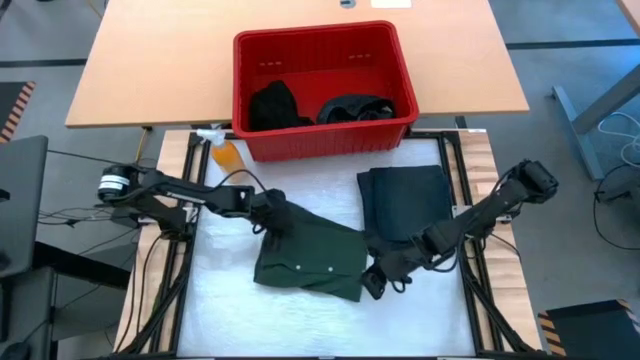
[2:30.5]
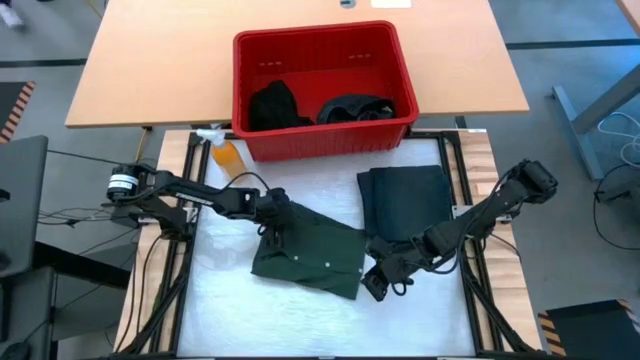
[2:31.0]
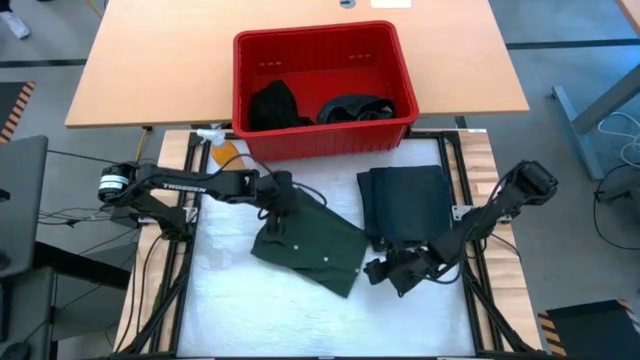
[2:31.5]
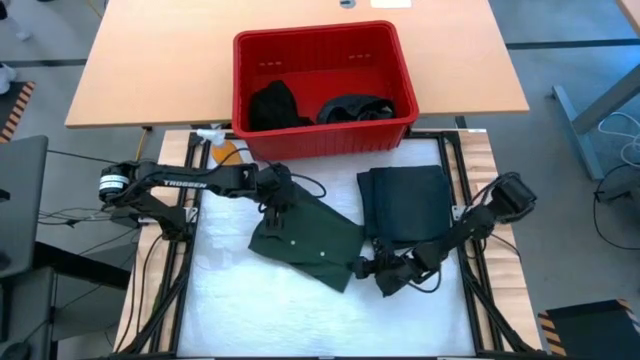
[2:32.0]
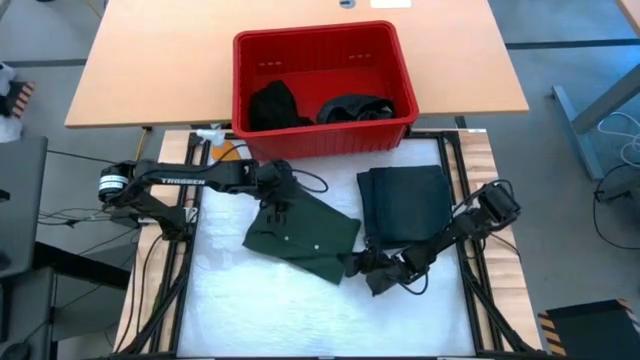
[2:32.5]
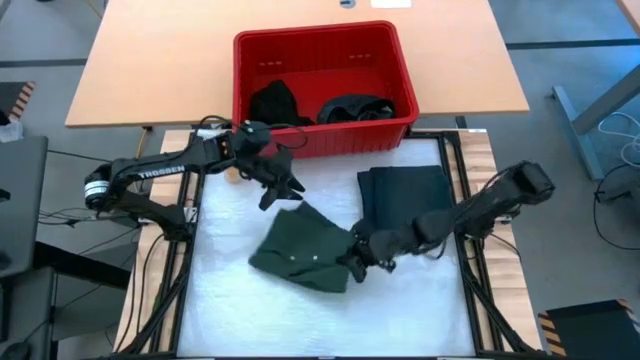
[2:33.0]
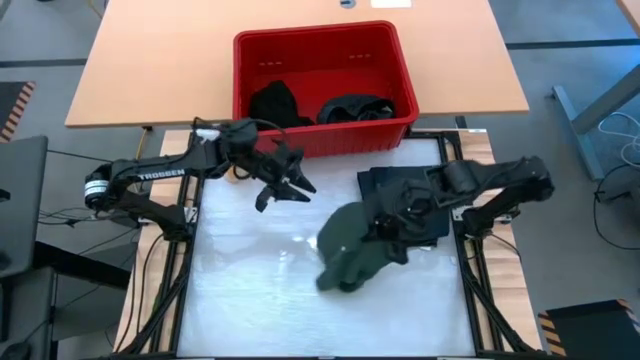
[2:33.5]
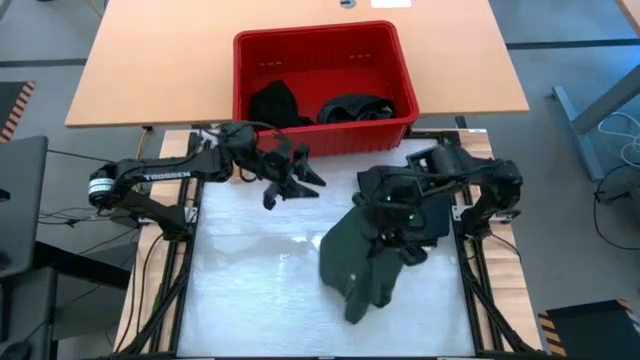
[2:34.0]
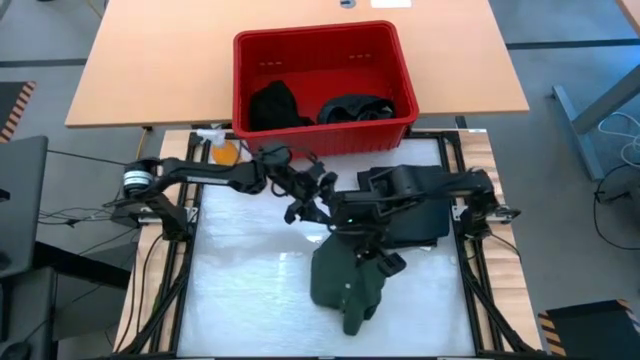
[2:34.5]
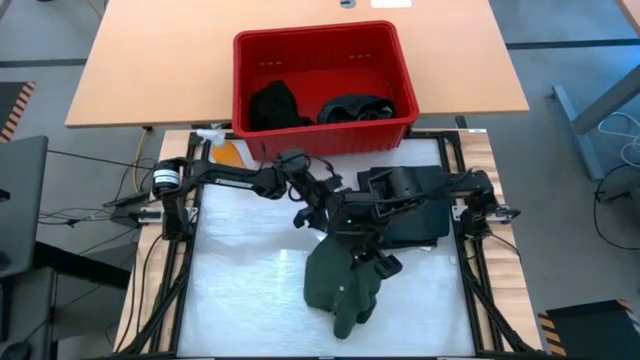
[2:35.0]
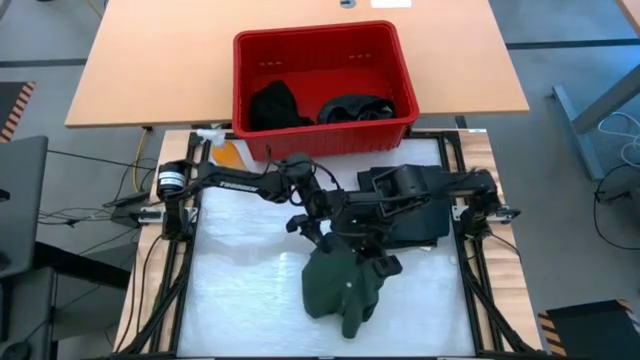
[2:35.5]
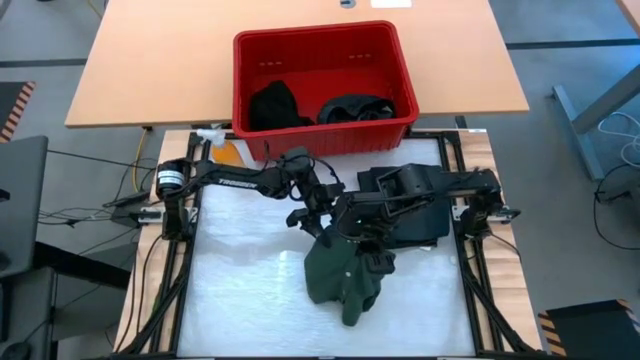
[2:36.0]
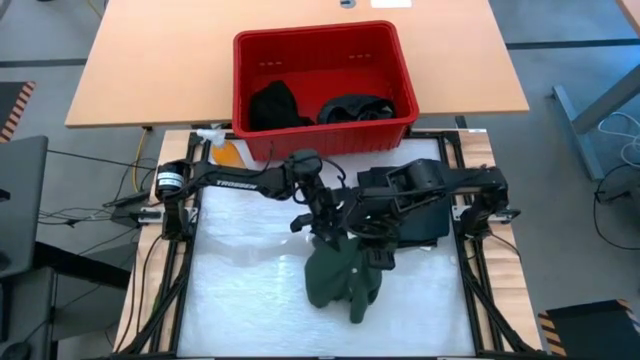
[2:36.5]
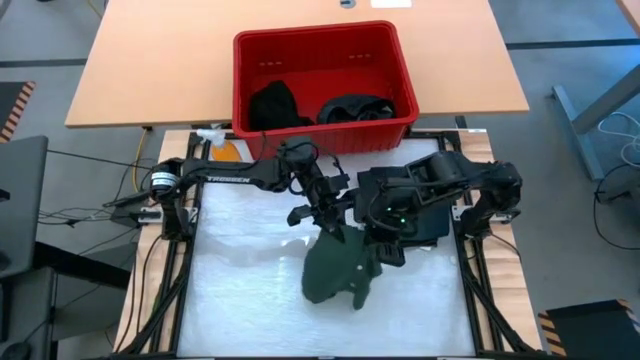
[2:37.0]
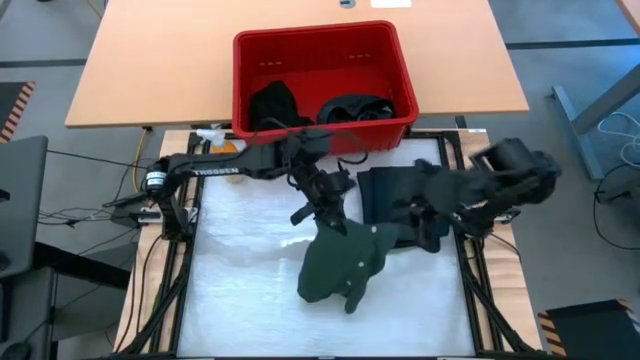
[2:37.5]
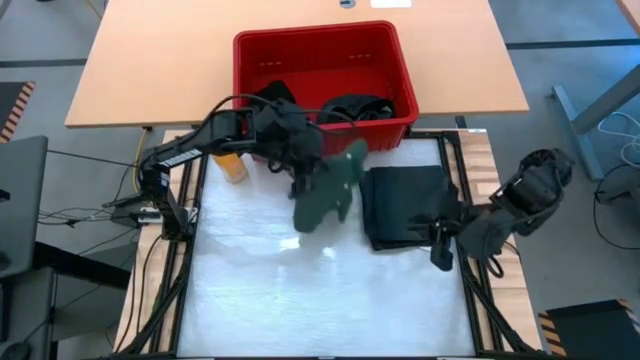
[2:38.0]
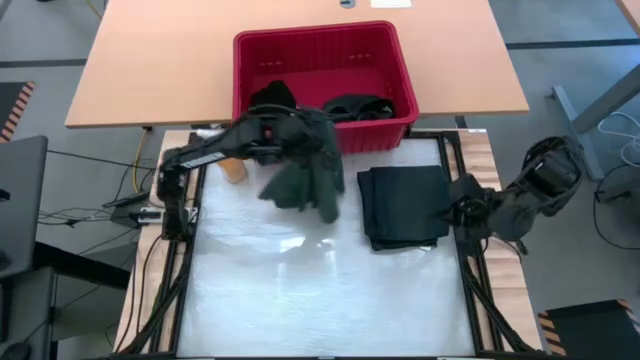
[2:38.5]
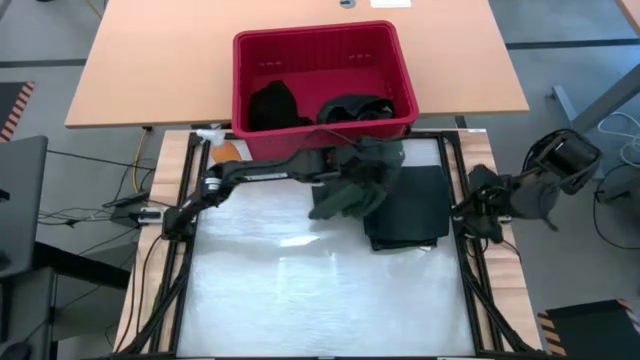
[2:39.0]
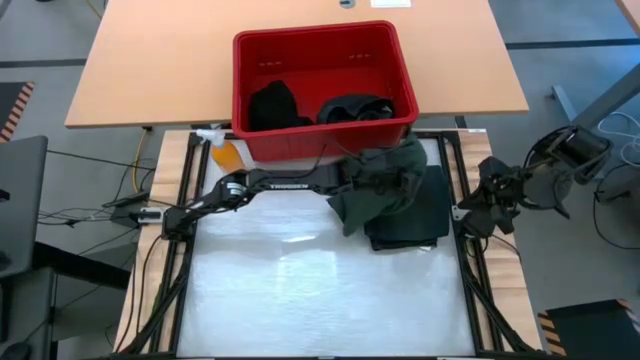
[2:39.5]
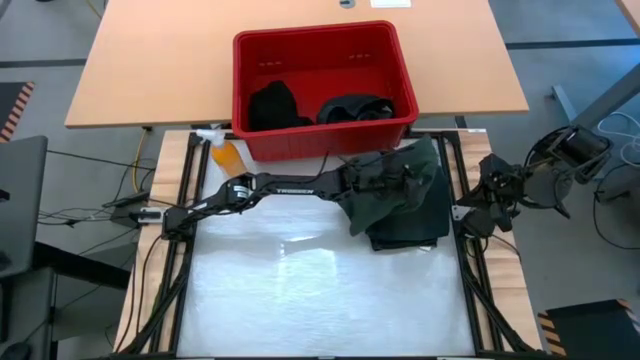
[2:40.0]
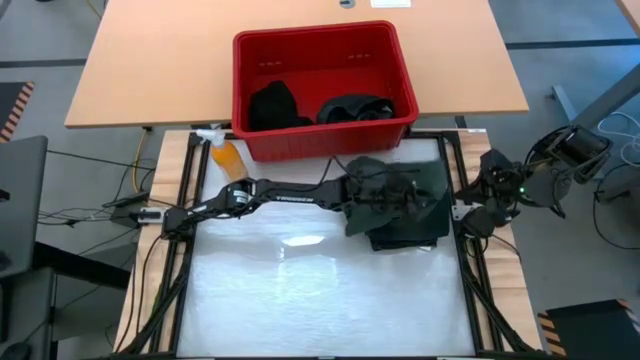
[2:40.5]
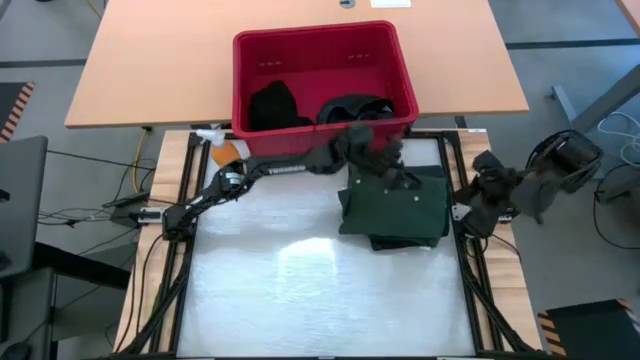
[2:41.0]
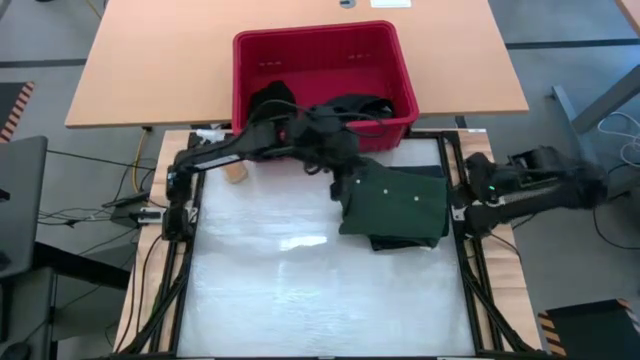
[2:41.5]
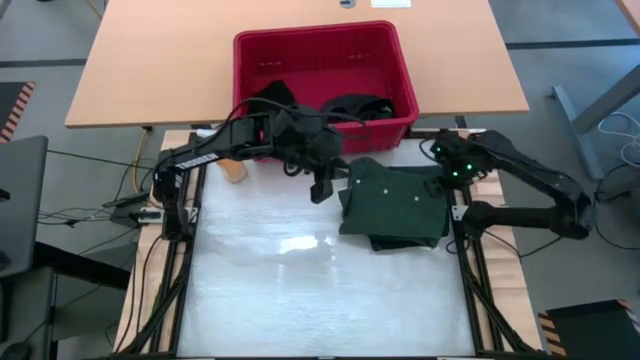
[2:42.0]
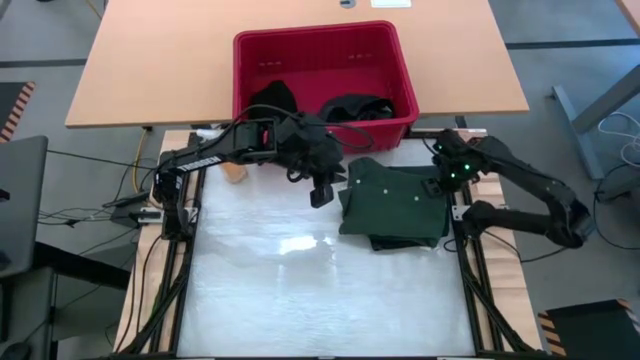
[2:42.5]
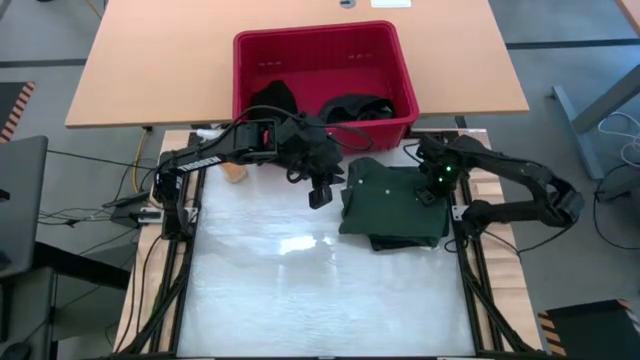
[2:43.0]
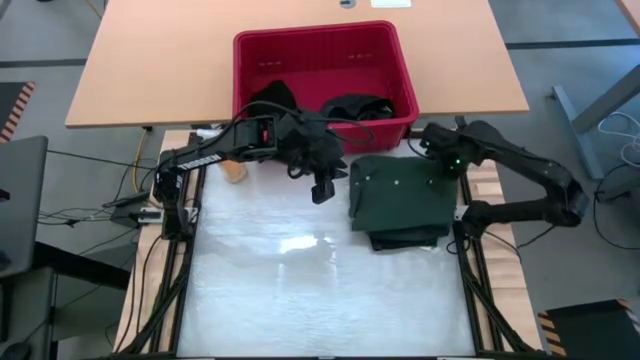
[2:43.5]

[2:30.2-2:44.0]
Task: Fold Laundry from Bin
Stack the green polo short on the top of the dark blue pants

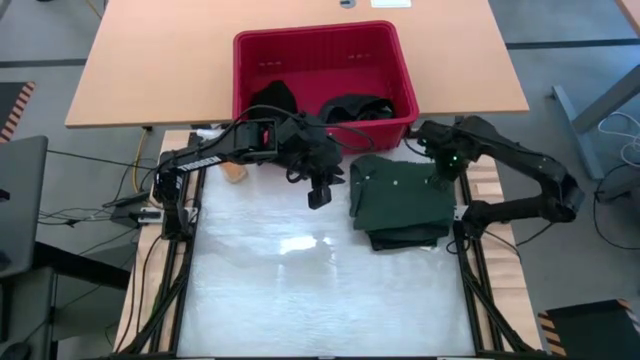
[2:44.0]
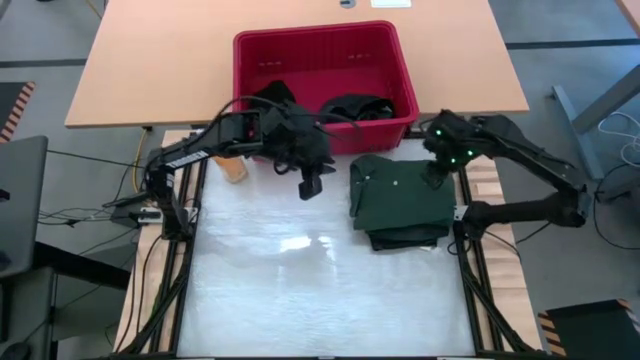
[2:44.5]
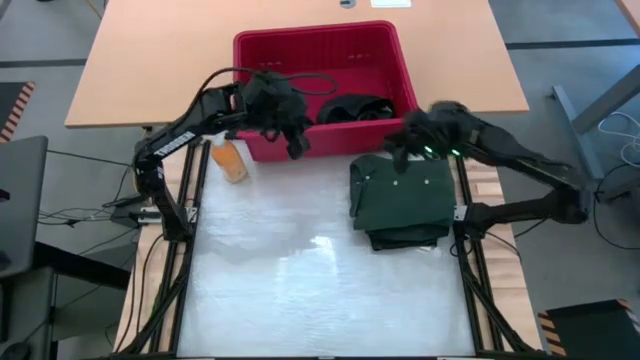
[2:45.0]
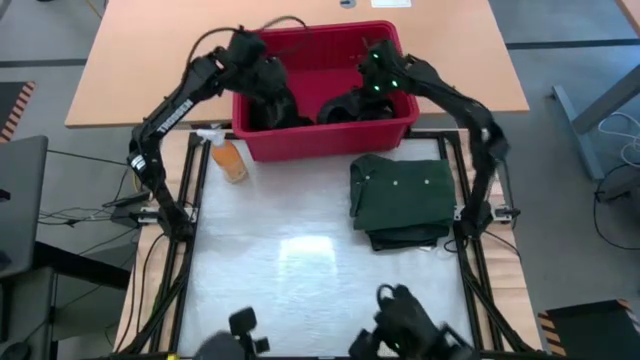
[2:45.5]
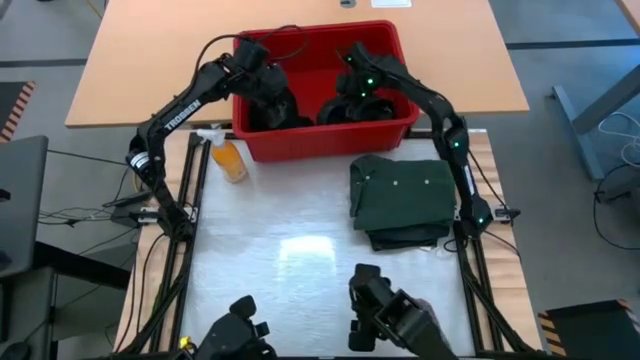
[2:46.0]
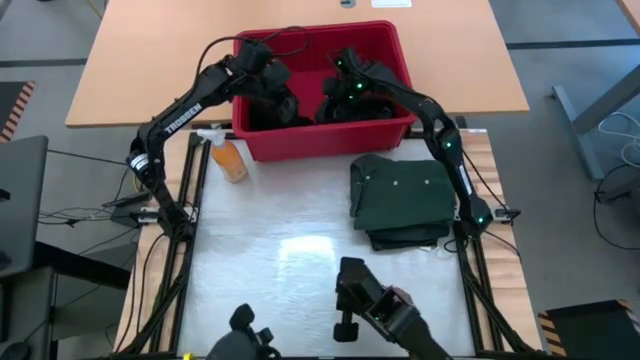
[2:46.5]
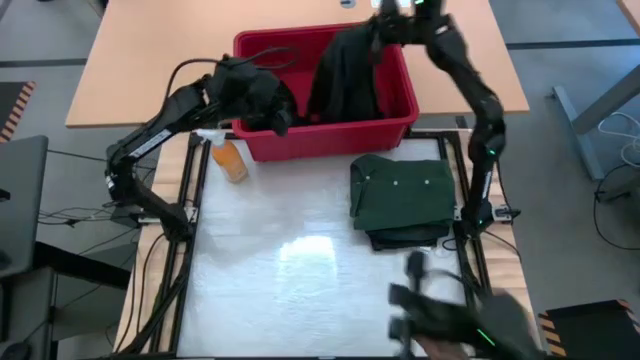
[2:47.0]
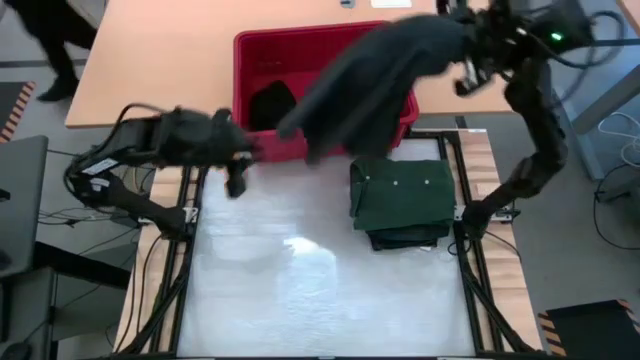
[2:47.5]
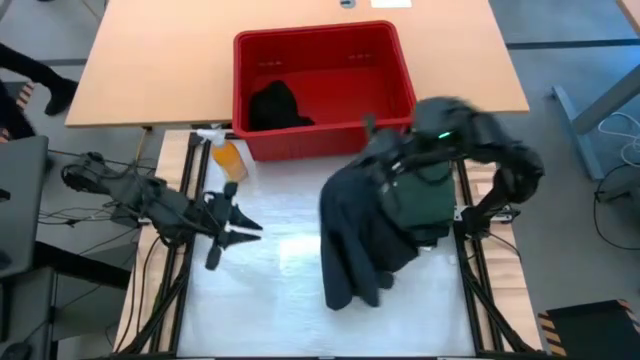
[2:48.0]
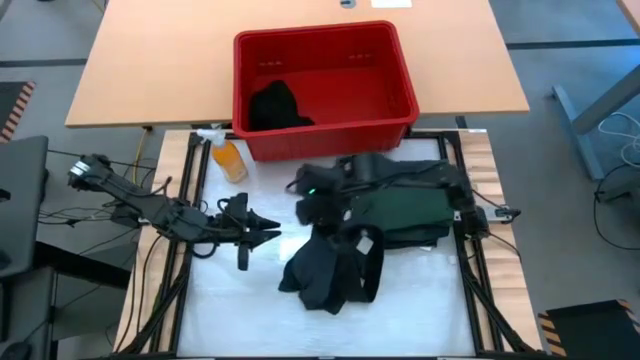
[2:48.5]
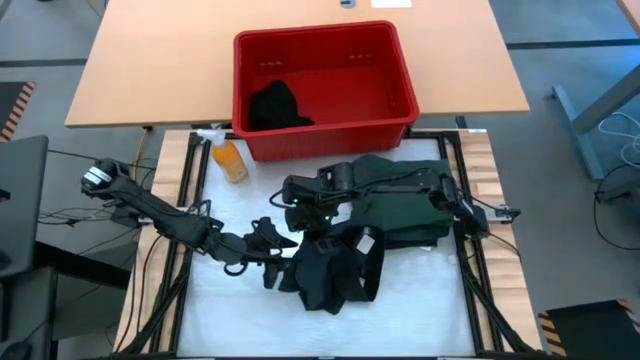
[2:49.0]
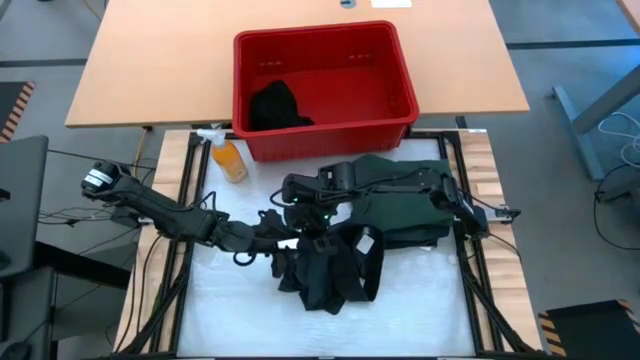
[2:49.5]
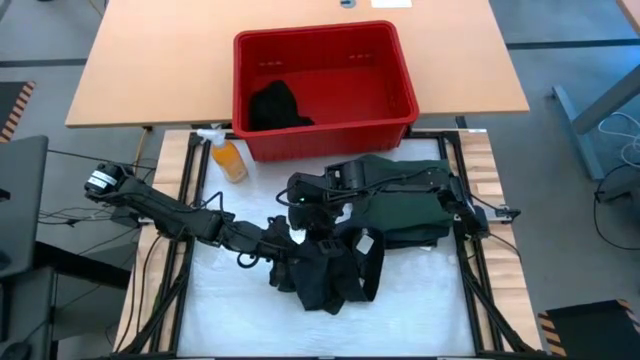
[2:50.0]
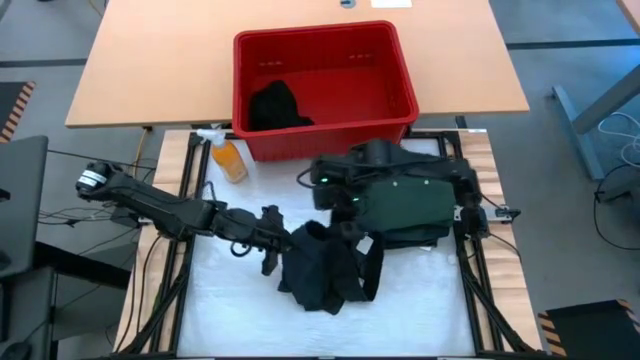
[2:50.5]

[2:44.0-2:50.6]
Remove the black short from the red bin

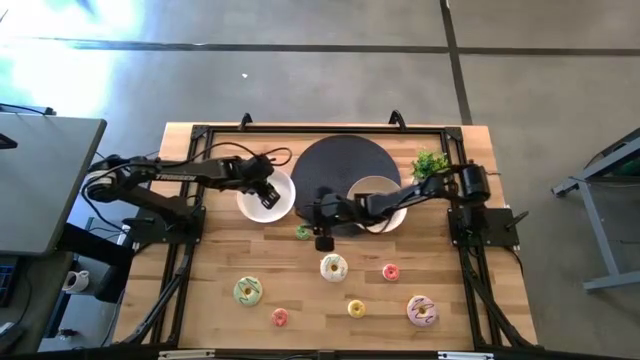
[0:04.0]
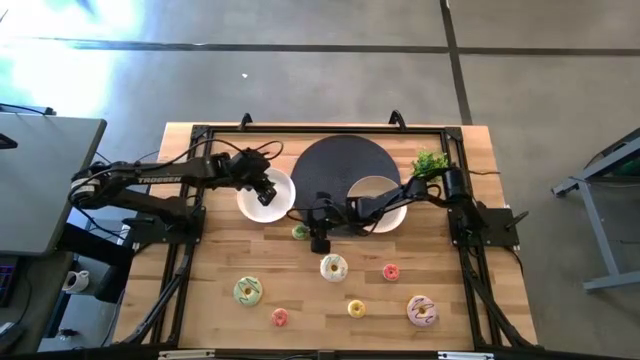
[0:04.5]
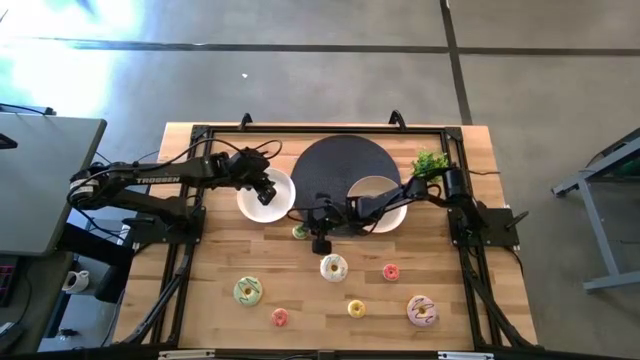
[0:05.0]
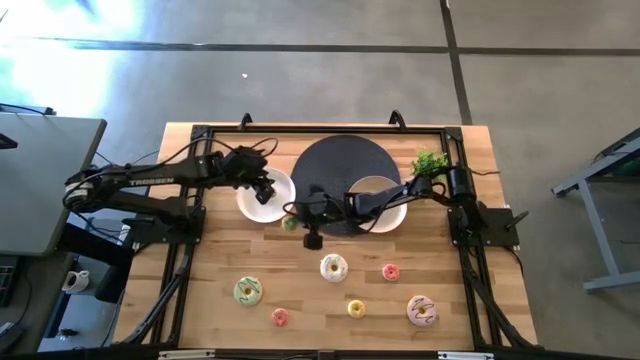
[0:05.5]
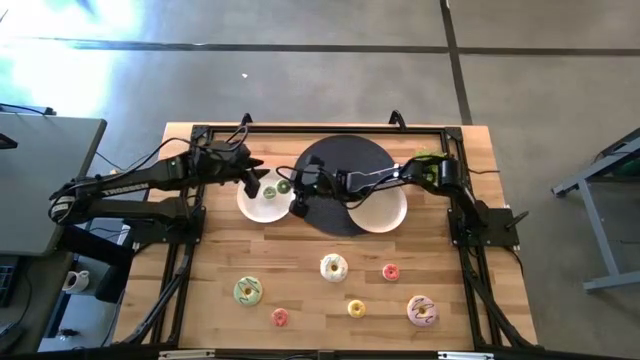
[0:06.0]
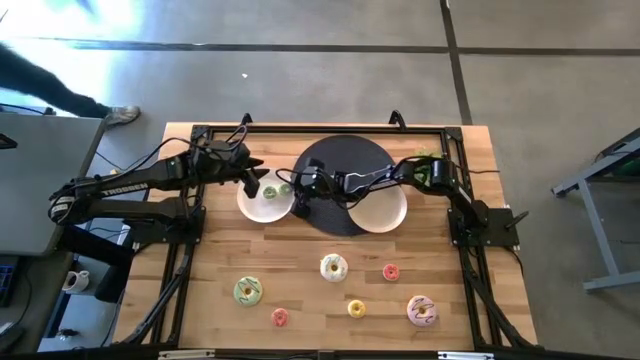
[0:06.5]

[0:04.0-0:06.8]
Task: Pick & Place donuts
Put the small green donut into the white plate
